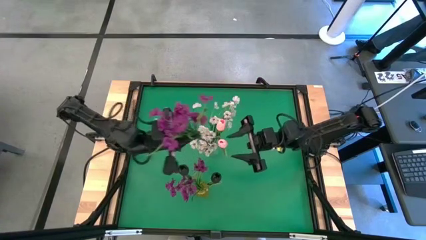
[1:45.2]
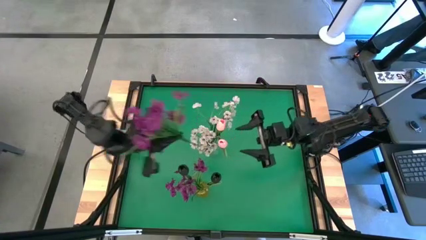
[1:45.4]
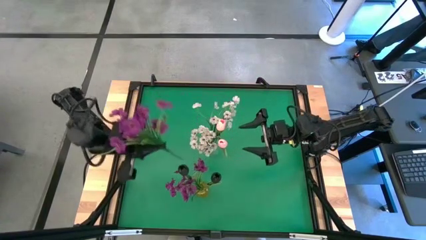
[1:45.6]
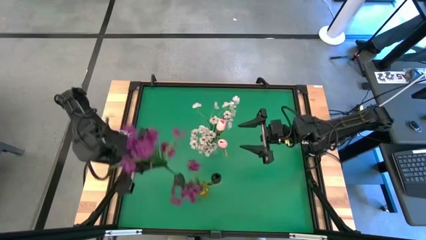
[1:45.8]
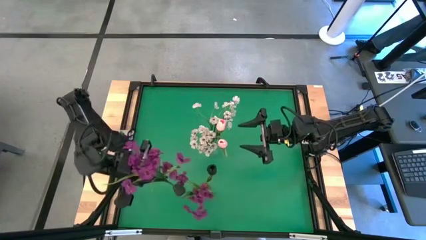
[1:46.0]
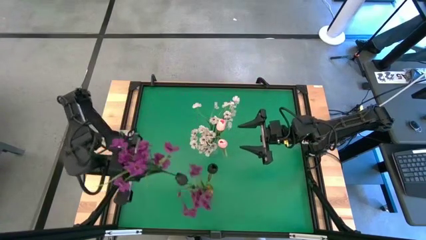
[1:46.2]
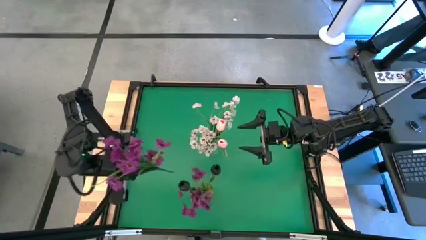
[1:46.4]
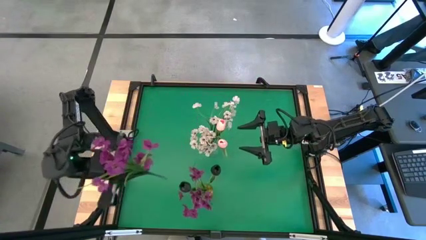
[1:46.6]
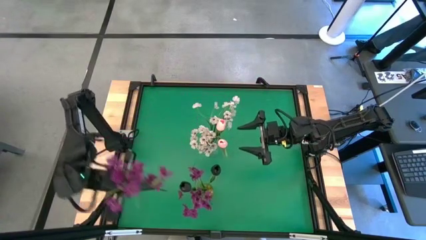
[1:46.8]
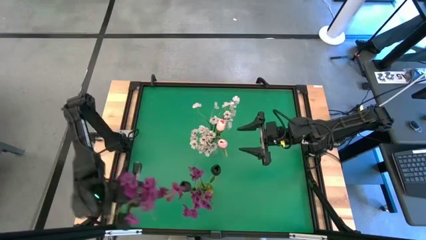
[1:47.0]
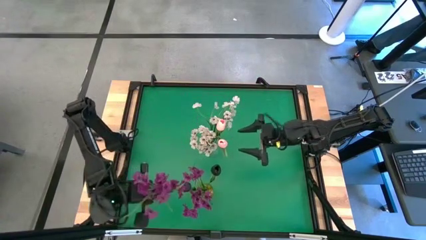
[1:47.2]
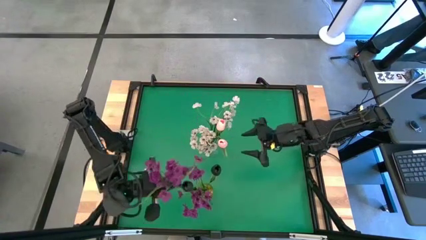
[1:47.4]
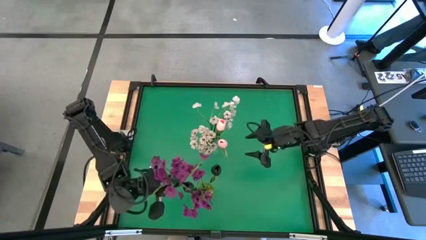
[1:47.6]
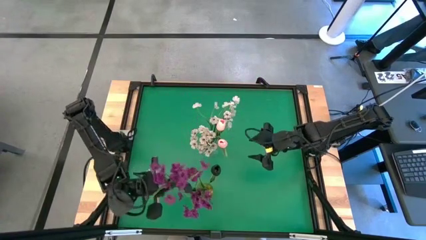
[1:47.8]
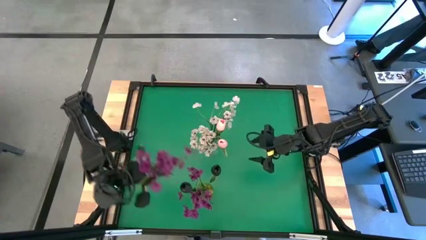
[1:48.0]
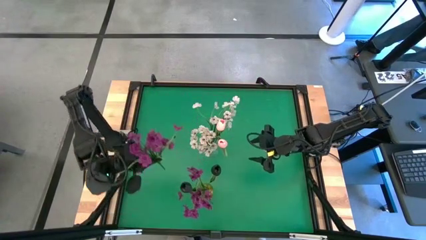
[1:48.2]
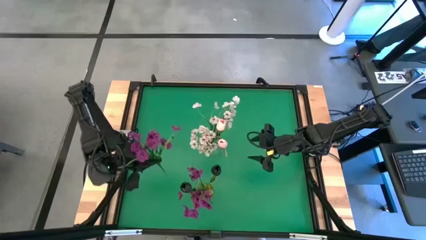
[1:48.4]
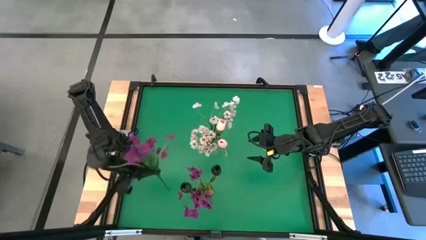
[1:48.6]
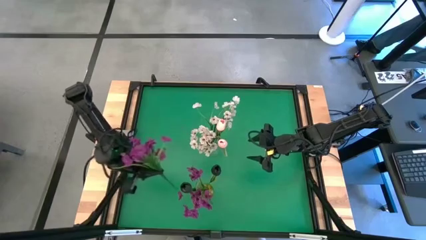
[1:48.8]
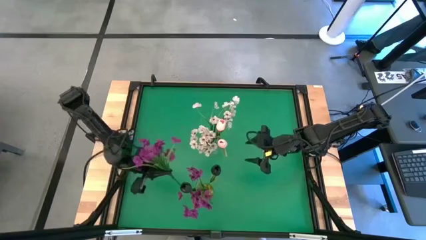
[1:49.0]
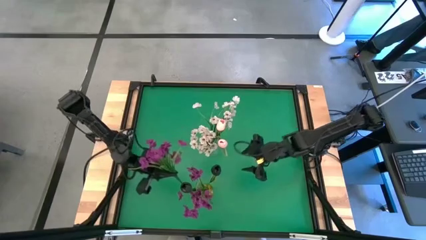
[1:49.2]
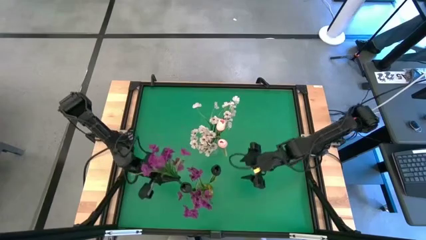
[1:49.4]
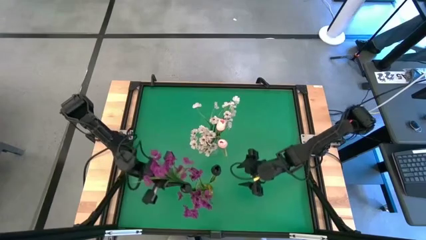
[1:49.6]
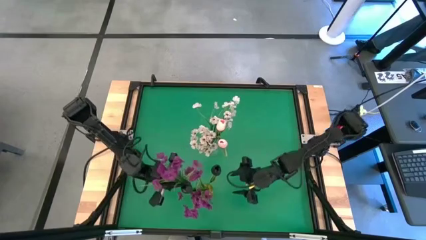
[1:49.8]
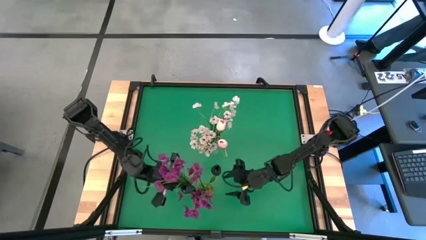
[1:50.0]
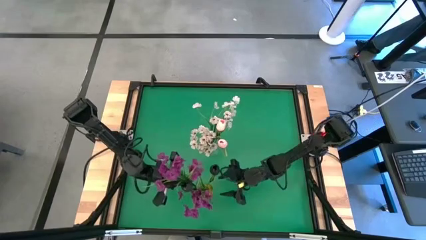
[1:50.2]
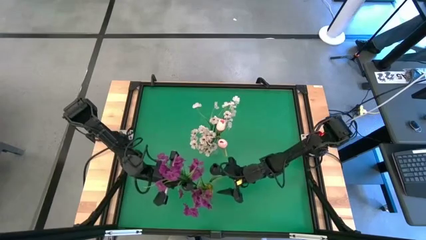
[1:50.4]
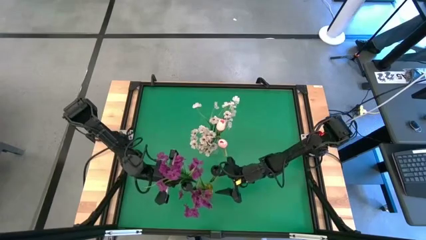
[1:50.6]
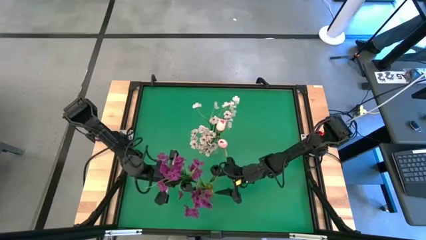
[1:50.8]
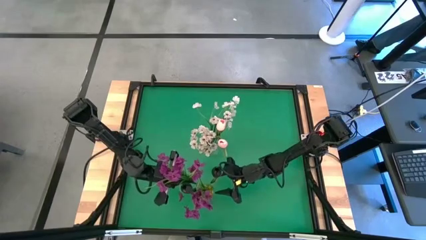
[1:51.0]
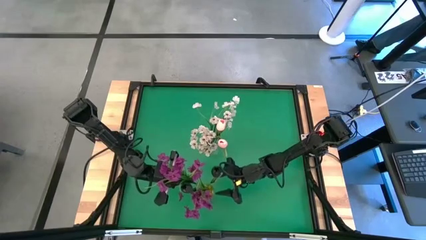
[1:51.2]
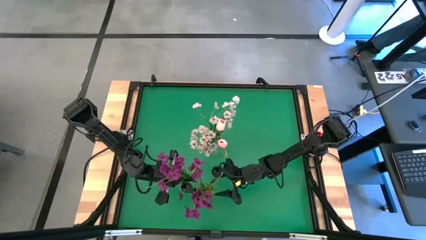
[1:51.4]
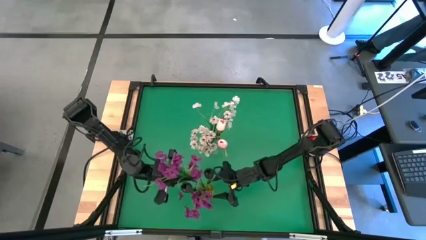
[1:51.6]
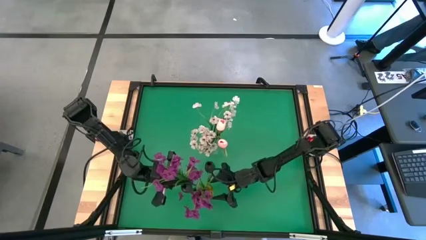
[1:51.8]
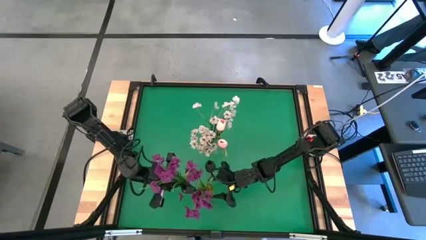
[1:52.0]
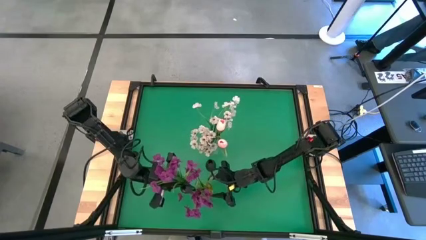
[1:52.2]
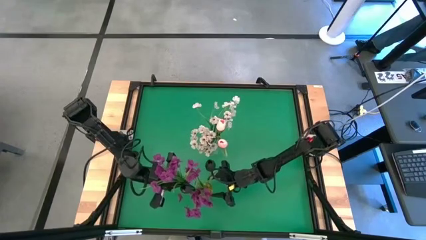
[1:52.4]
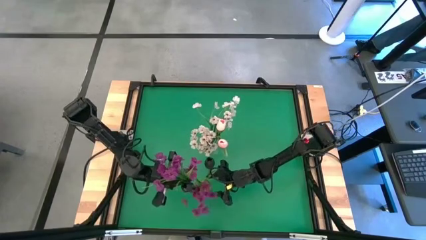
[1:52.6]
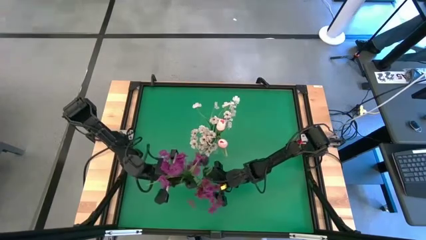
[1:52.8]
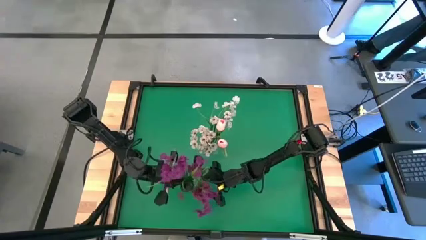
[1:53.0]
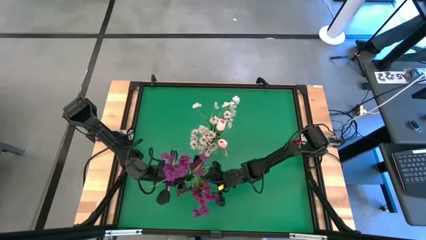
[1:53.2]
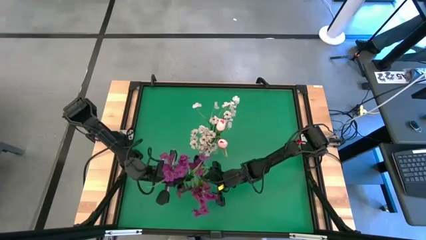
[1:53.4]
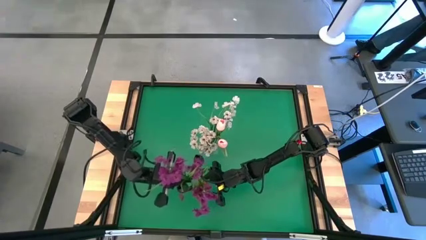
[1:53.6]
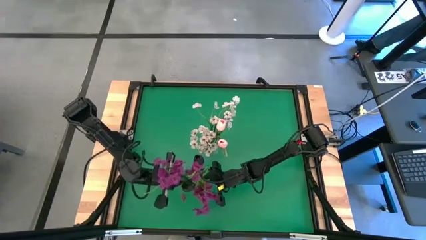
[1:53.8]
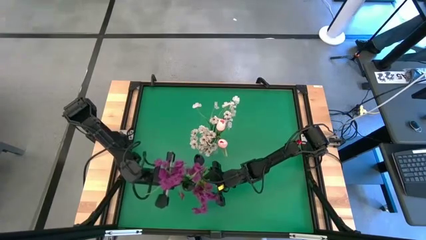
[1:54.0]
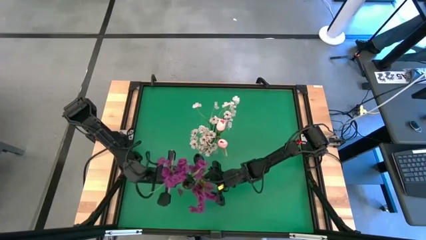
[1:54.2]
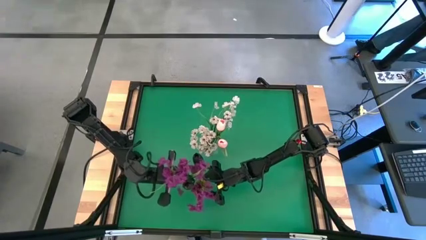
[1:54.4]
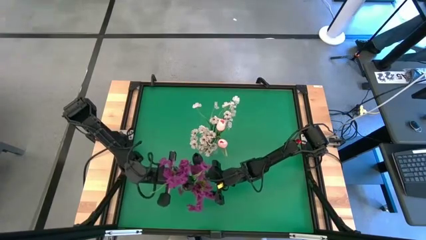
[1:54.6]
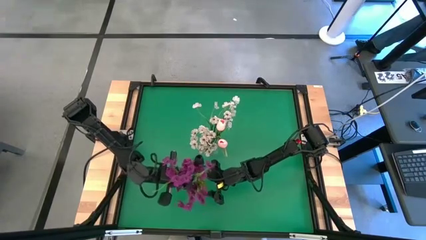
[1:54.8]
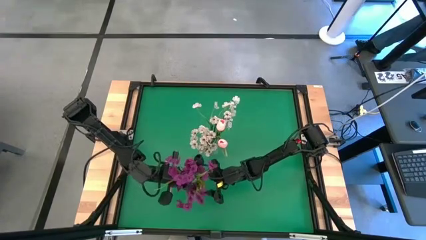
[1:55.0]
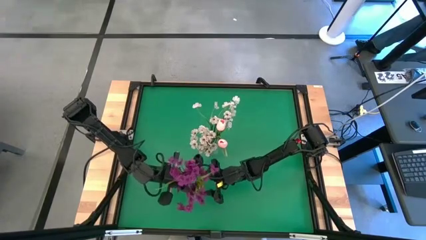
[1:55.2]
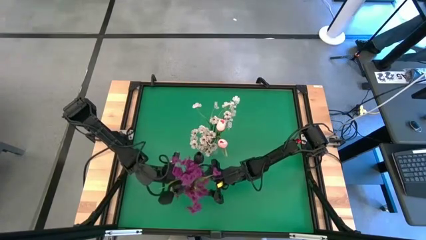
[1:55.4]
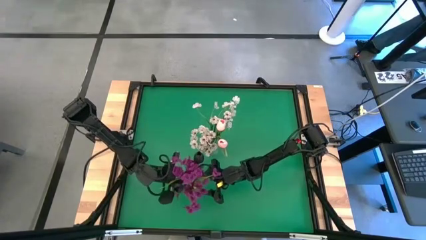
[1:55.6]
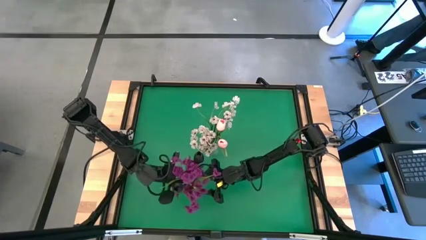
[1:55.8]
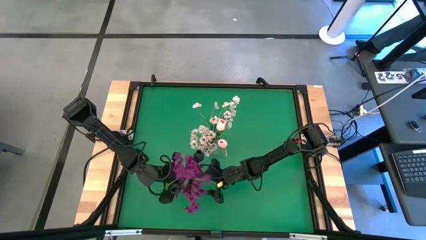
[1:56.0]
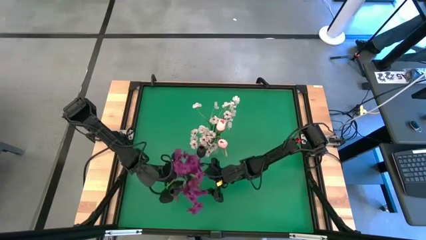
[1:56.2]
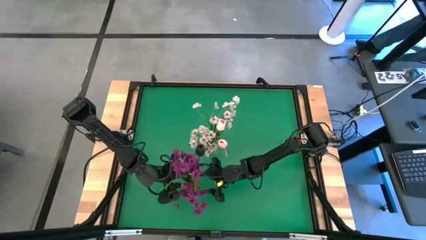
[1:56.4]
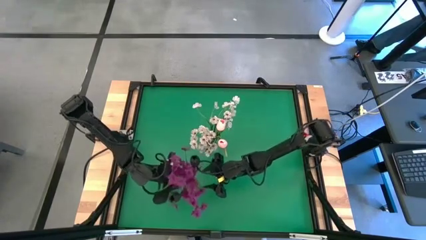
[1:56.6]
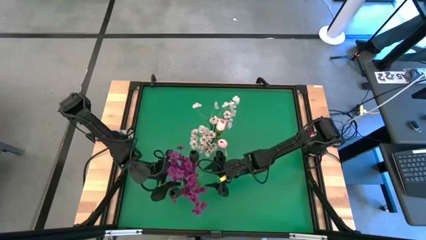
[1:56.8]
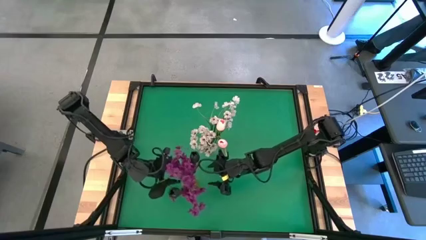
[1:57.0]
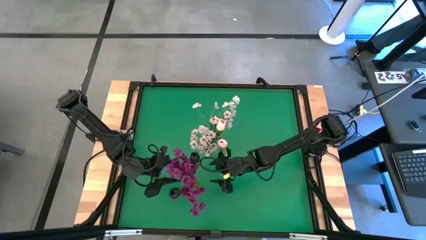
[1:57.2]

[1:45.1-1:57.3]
Task: Sort flowers into vase by color
Put the purple flower into the yellow vase

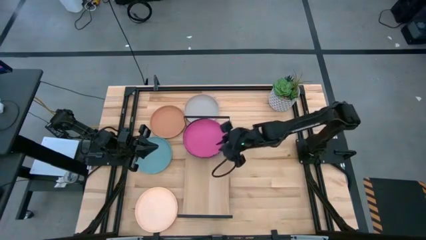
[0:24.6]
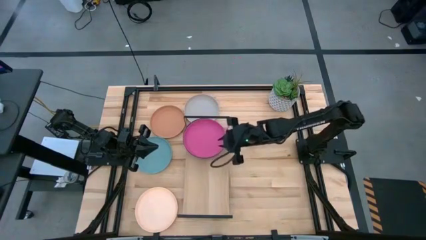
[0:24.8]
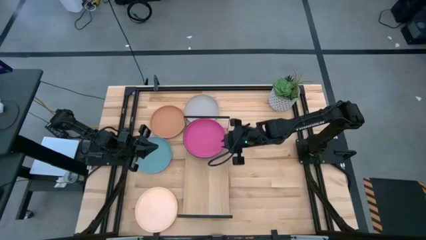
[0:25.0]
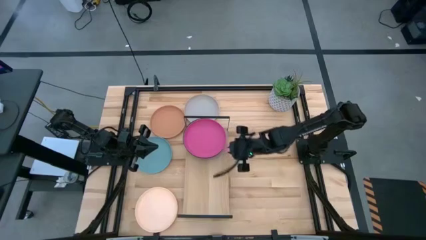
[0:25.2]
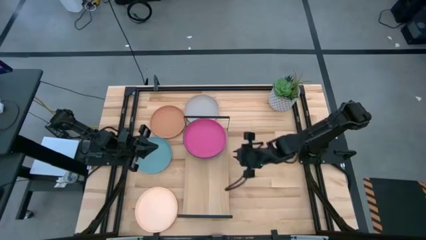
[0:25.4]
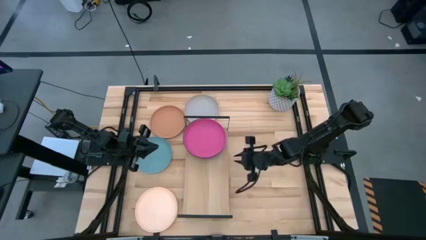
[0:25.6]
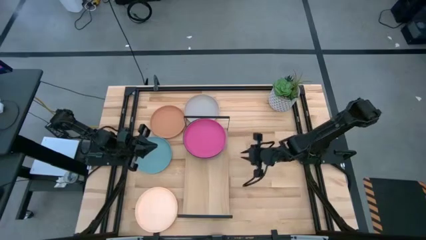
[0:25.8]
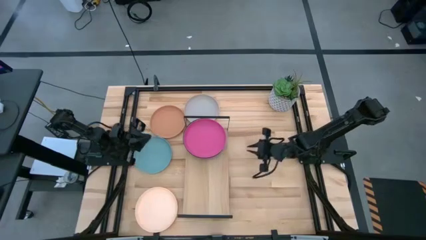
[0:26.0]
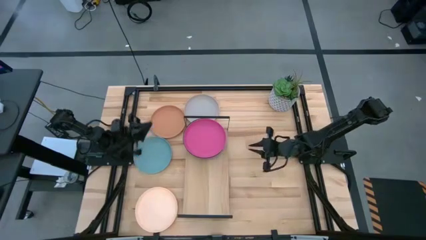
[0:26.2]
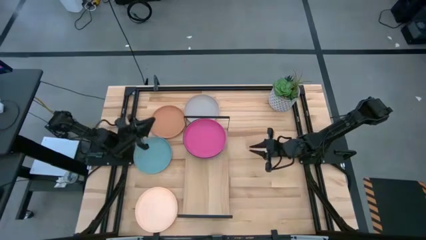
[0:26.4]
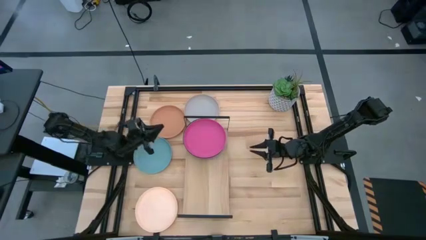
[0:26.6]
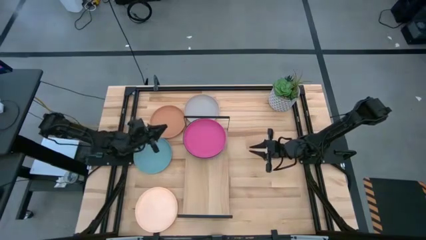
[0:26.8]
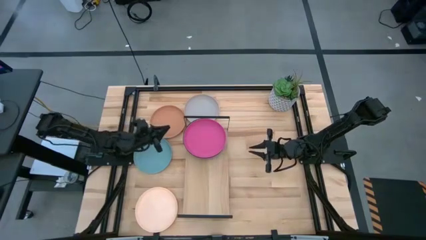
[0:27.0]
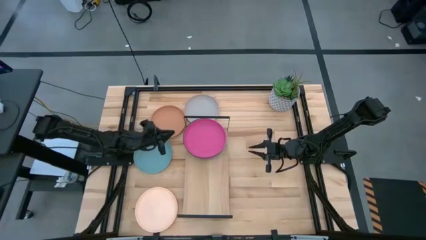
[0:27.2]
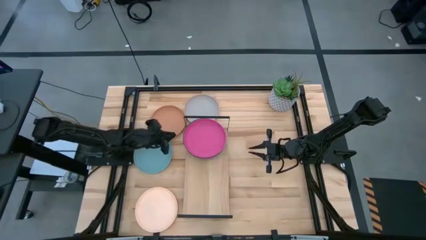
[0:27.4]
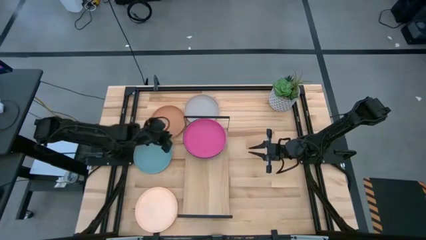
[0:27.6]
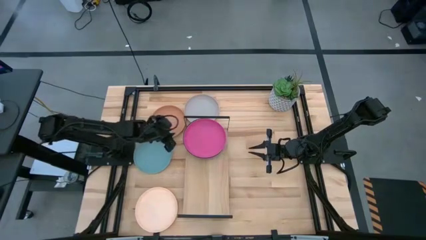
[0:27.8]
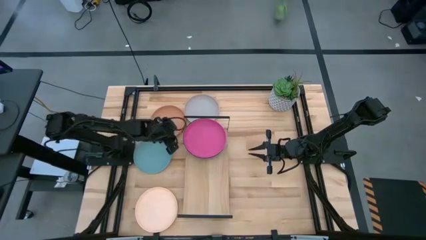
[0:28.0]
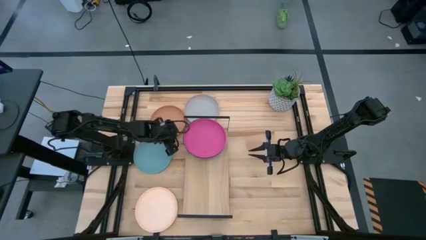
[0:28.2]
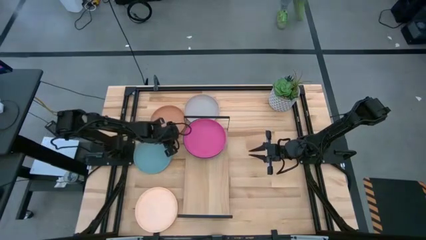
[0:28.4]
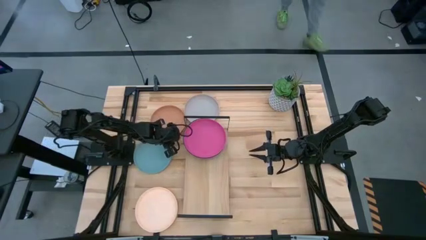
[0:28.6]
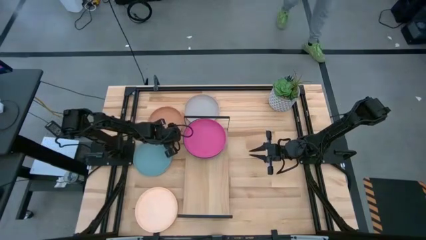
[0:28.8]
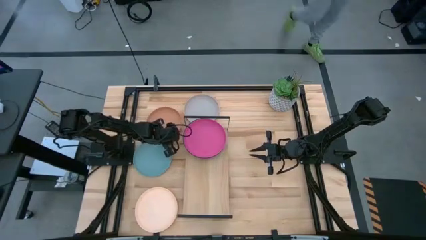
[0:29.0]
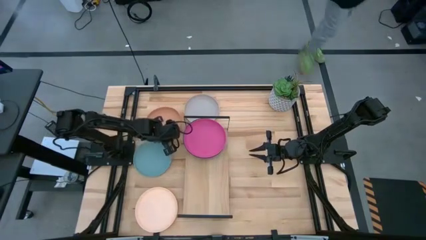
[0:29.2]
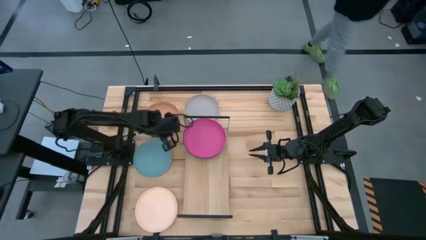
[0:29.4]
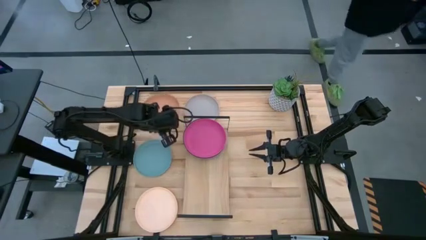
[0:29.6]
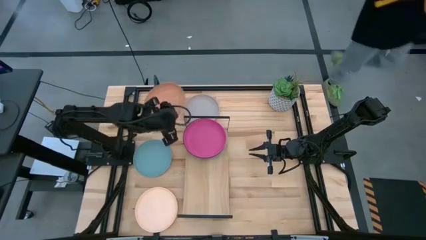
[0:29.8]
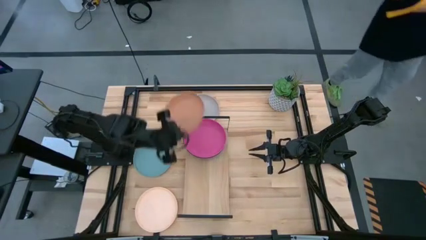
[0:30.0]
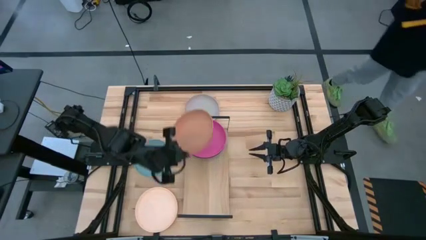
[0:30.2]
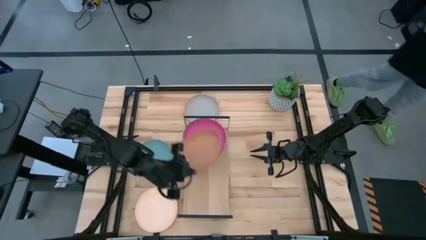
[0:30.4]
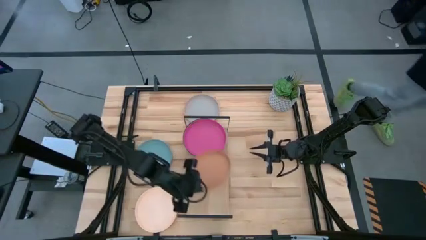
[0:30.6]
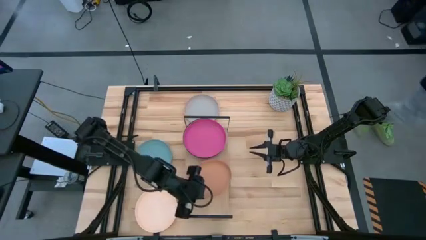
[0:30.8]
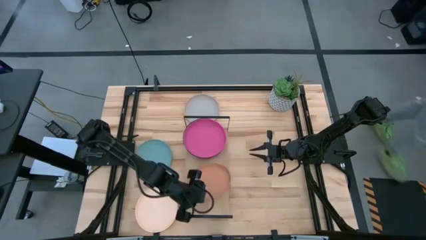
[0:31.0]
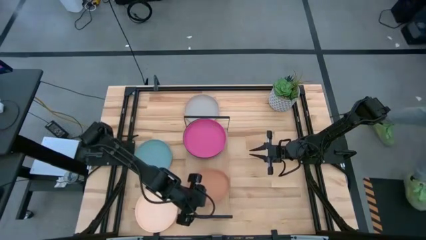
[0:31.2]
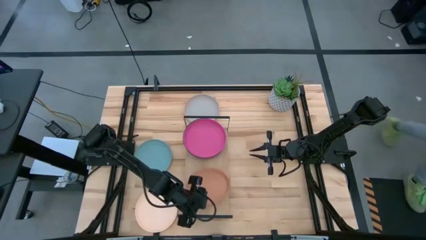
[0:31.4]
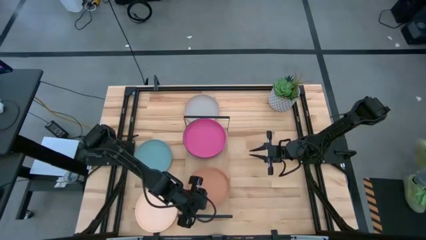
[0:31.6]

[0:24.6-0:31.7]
Task: Place and stack plates onto a shelf
Put the light brown plate on the shelf
